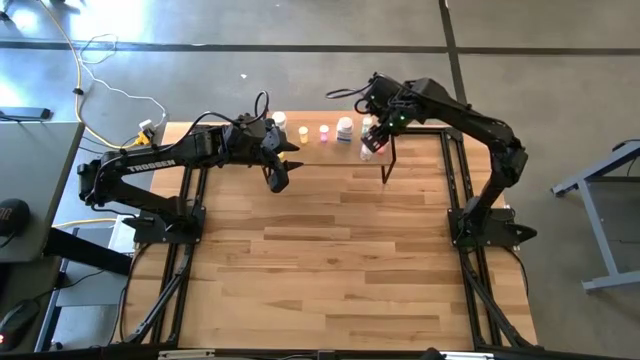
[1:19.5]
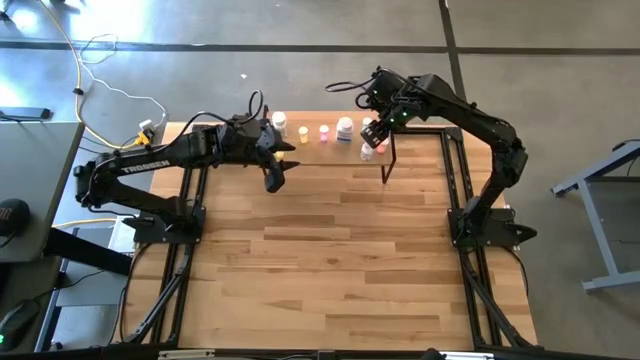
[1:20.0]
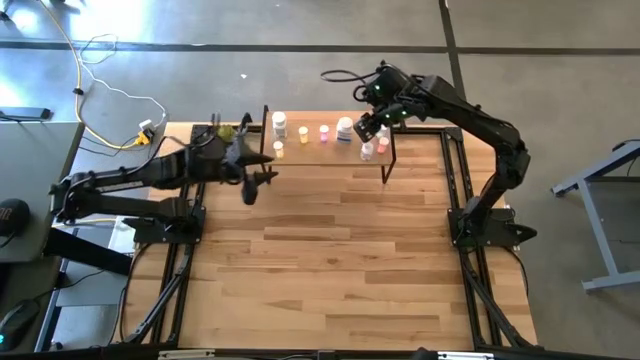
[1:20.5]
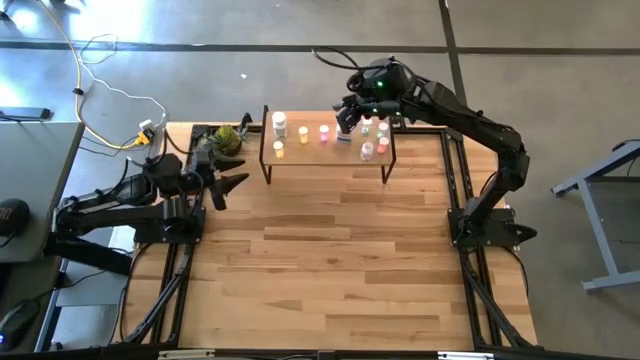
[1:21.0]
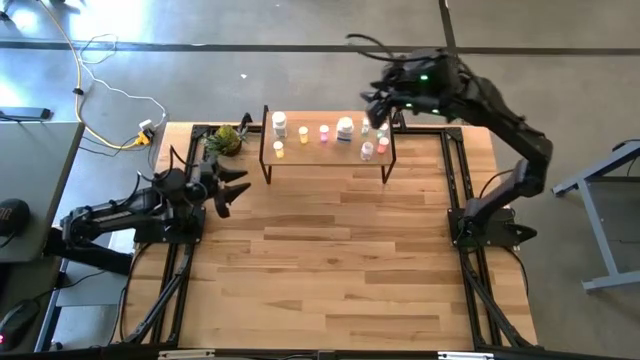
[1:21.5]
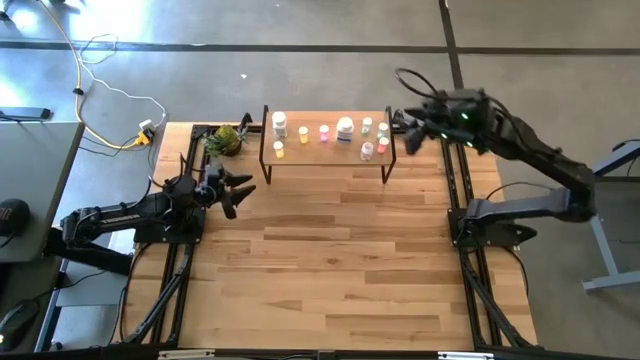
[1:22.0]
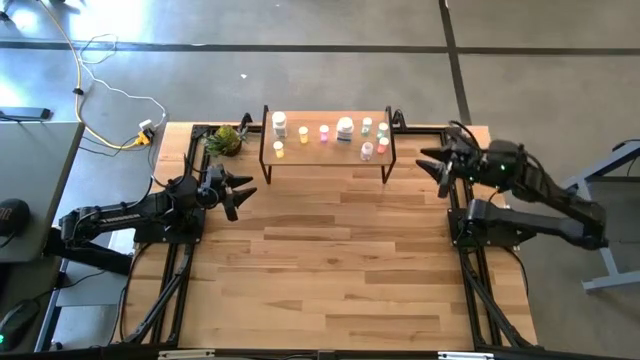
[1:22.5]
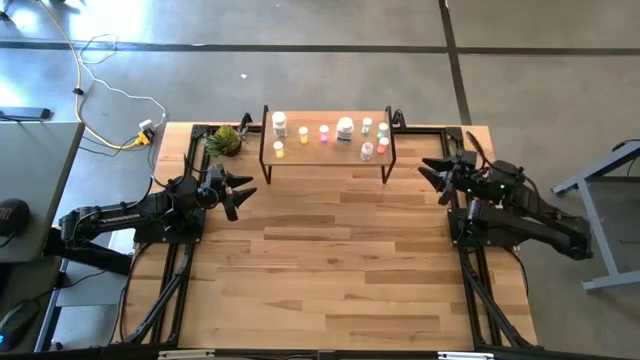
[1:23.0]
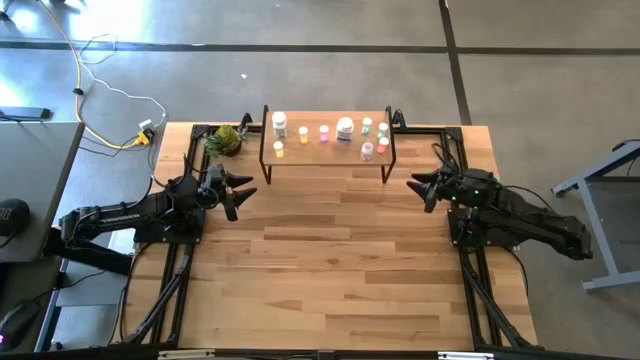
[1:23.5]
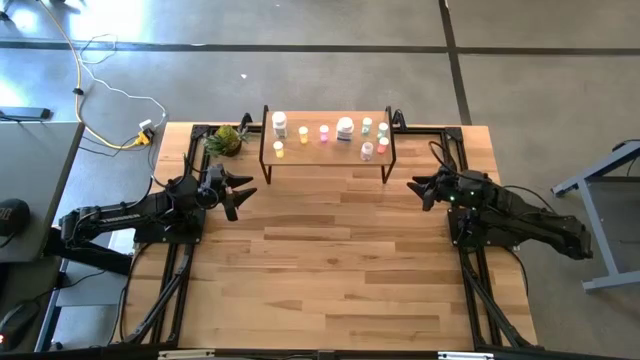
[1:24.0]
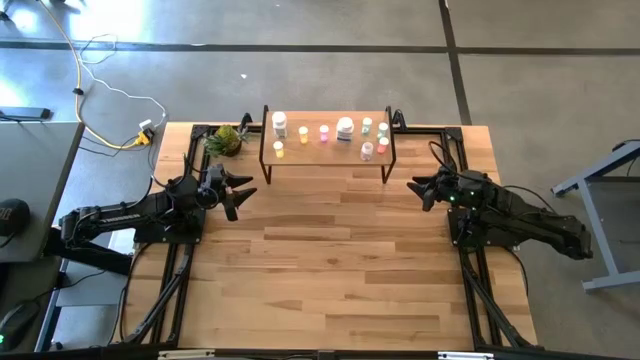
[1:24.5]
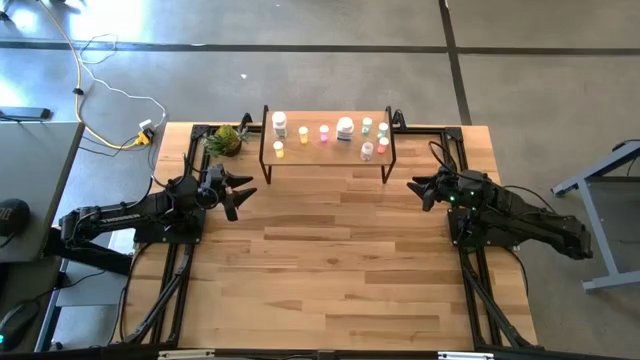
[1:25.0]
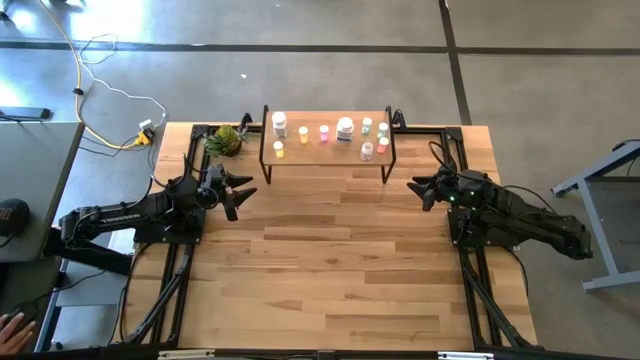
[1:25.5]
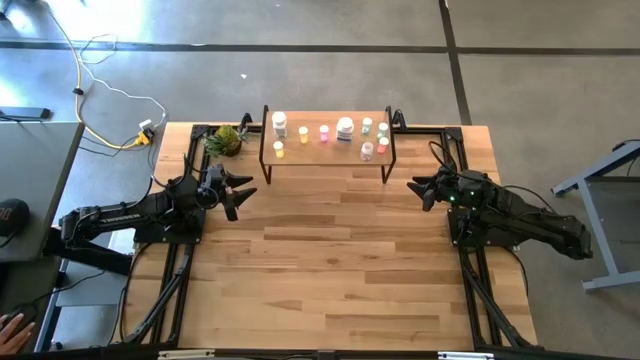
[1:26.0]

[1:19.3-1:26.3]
Task: Pick and place medicine bottles onto shelf by color
Return to Home Position

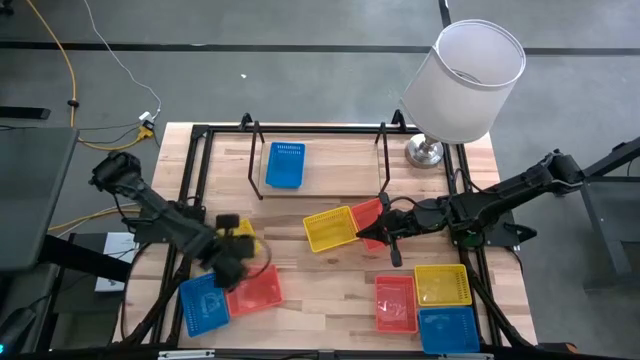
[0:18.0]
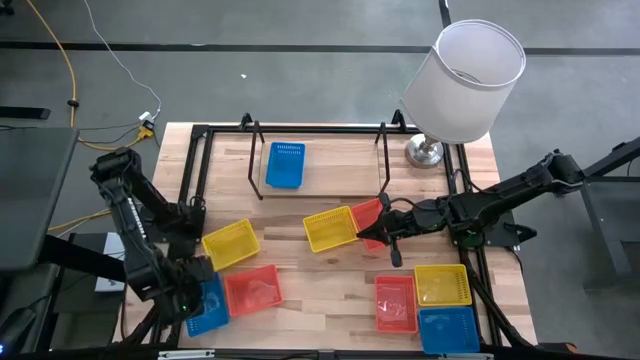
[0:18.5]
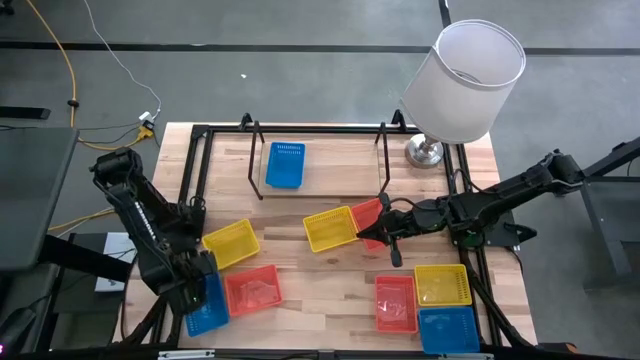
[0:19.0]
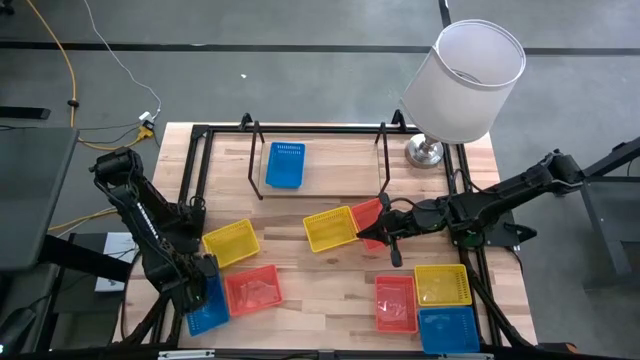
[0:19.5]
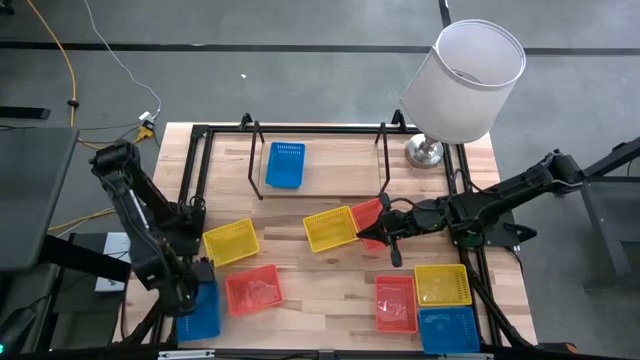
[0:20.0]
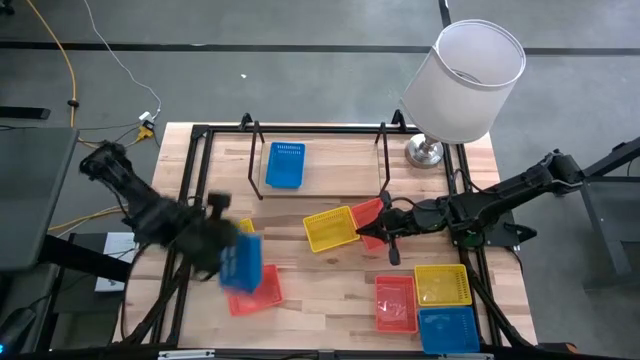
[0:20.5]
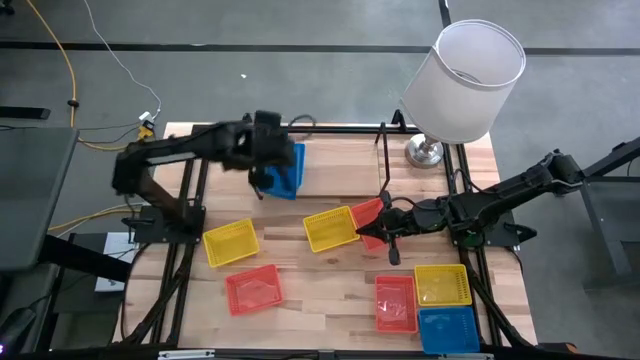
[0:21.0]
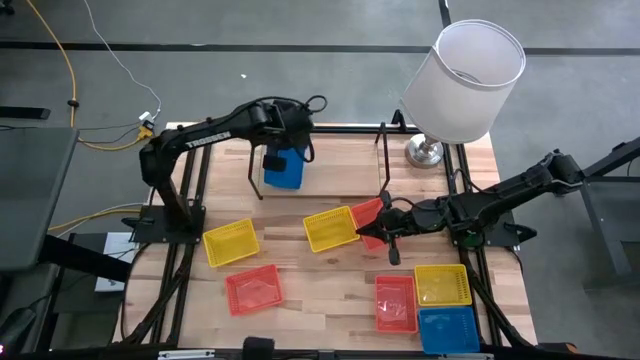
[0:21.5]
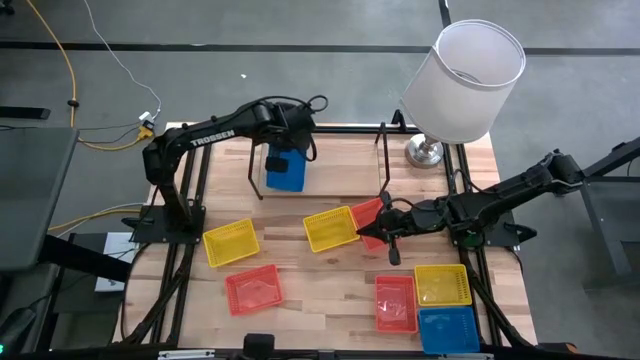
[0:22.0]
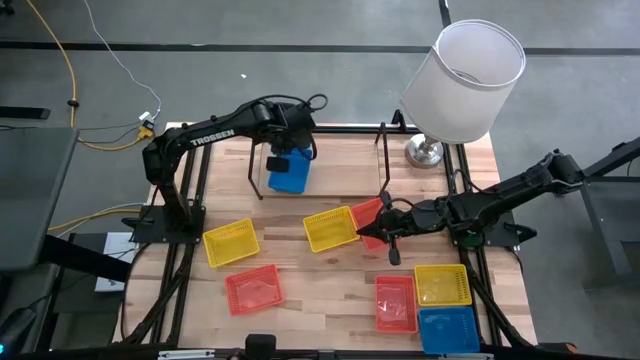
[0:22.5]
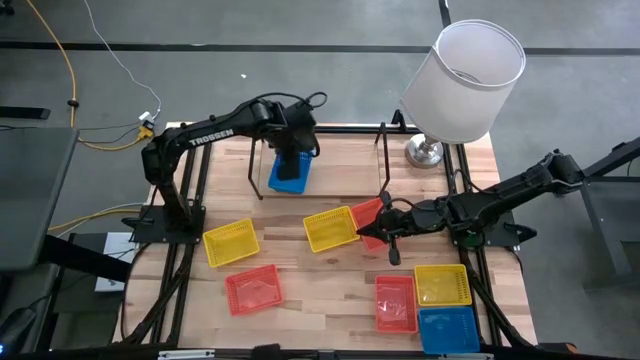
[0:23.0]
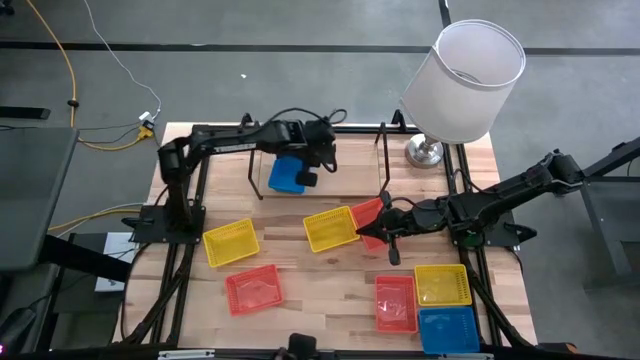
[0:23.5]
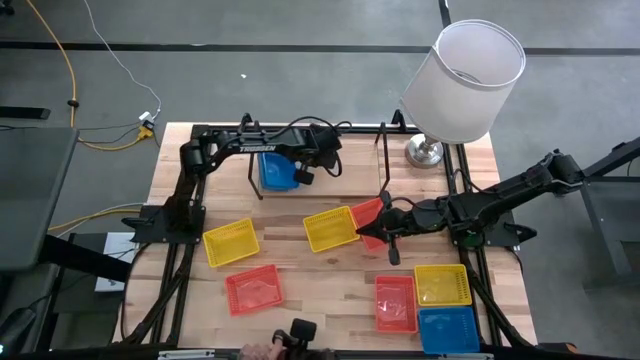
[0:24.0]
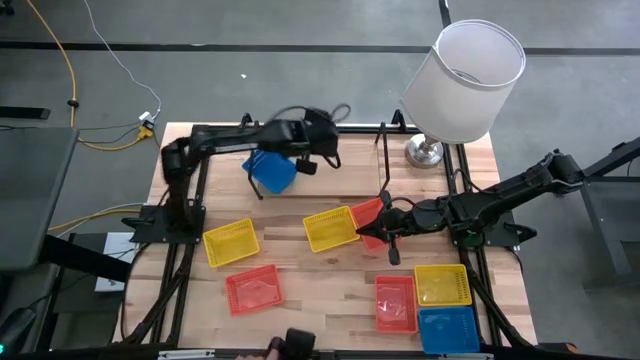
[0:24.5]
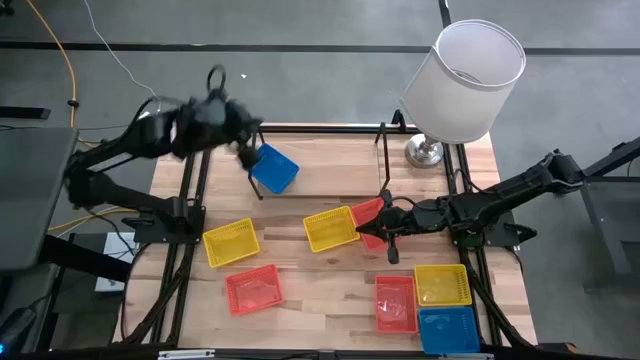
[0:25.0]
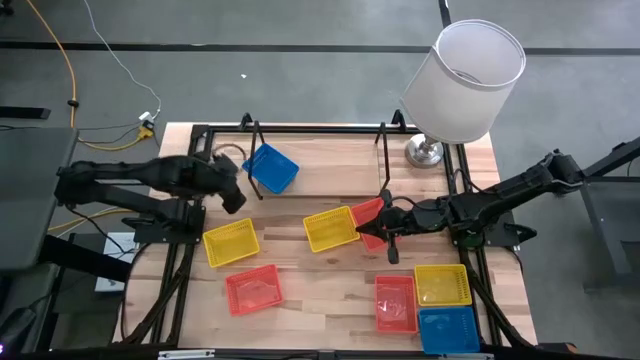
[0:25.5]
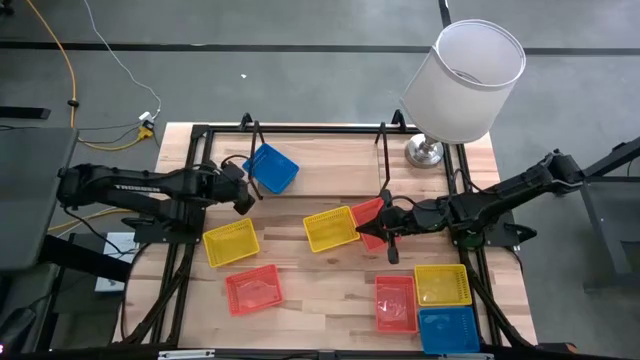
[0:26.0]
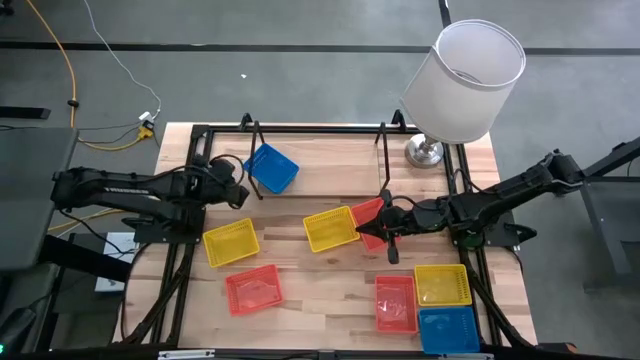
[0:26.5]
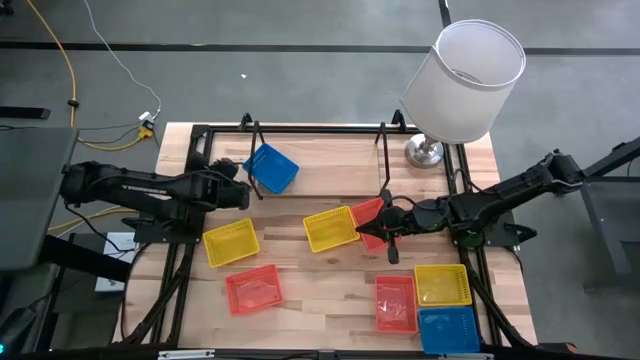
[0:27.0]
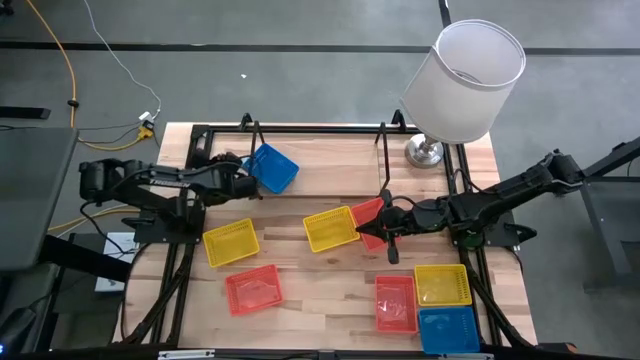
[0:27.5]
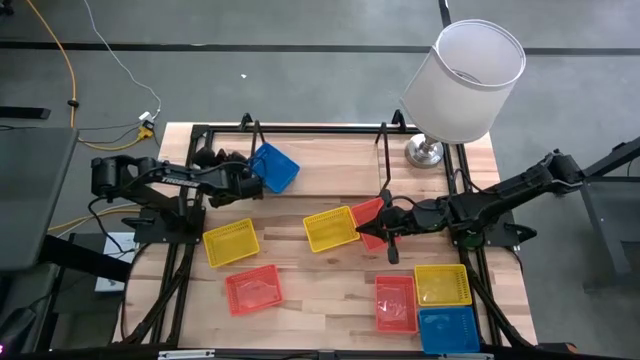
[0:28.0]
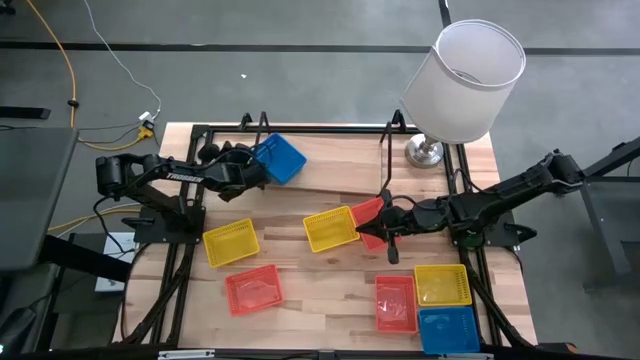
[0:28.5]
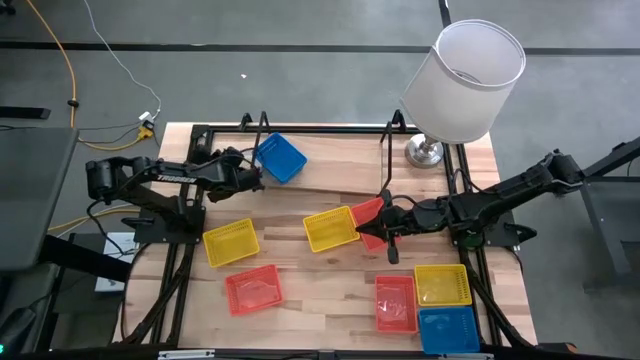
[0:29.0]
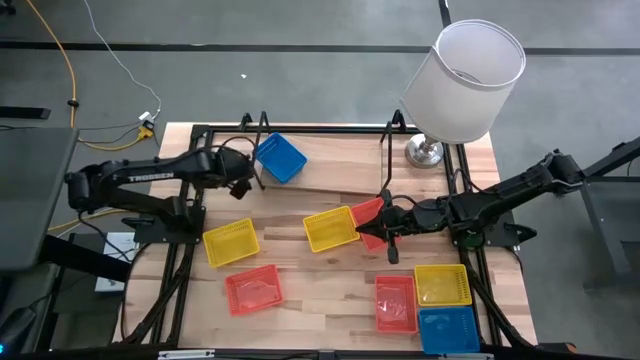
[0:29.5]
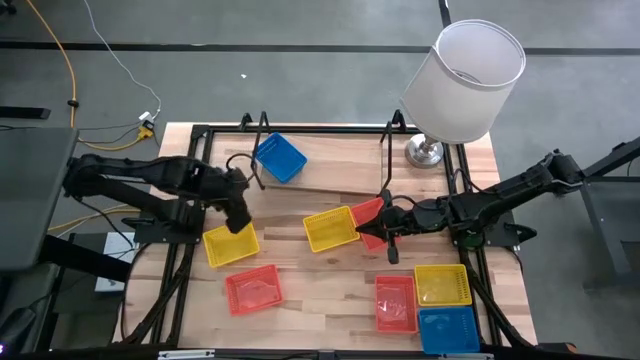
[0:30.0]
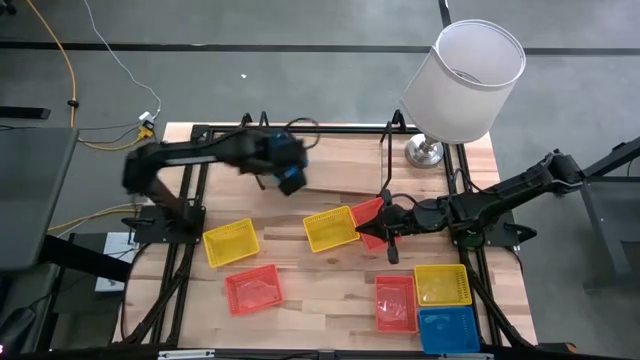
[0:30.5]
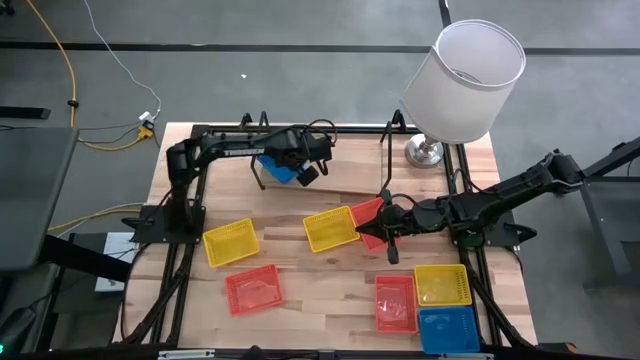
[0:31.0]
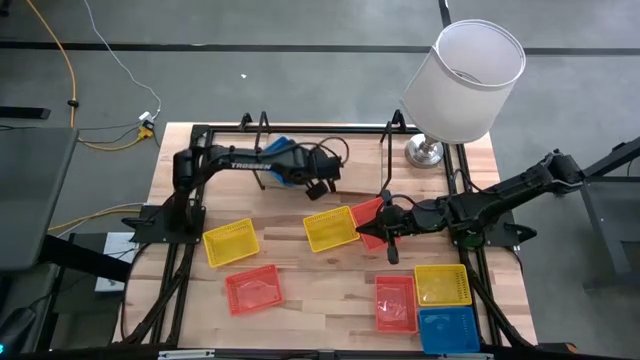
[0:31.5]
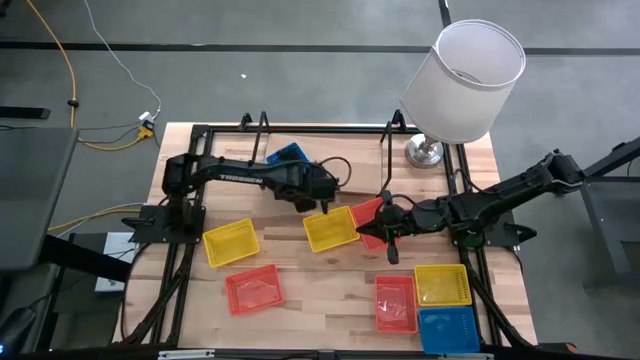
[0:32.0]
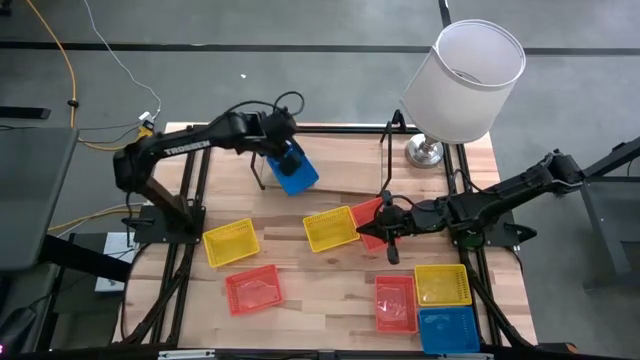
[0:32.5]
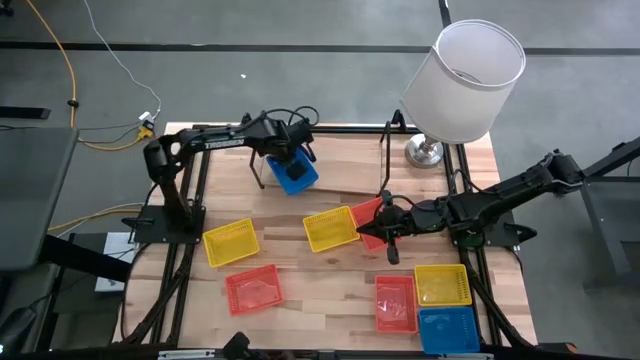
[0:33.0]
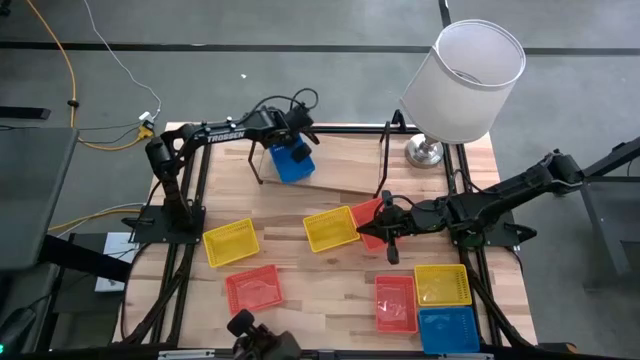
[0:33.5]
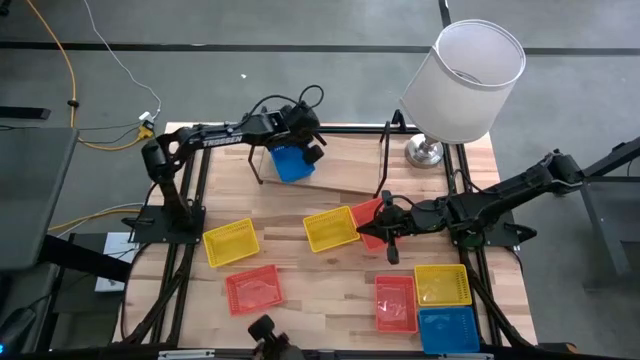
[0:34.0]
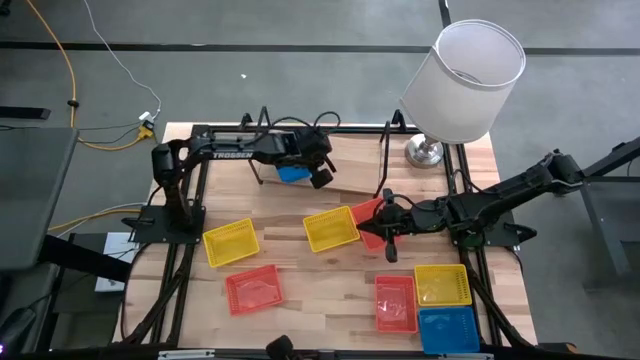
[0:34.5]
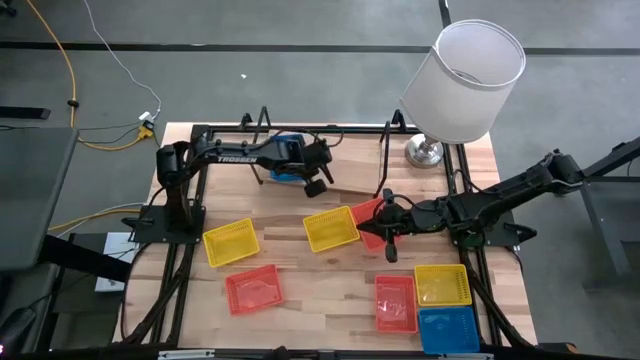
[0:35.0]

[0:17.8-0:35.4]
Task: Stack baskets on shelf by color
Stack the left blue bin on the blue bin on the shelf
